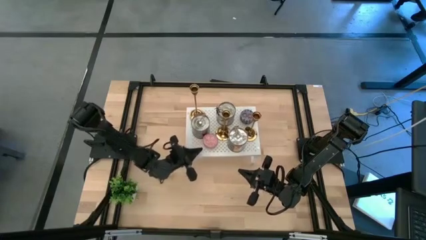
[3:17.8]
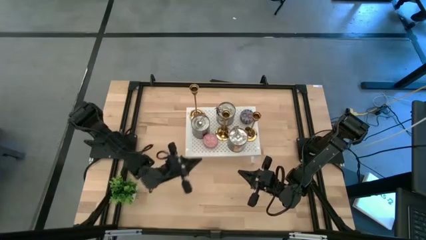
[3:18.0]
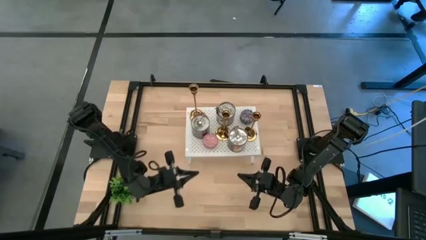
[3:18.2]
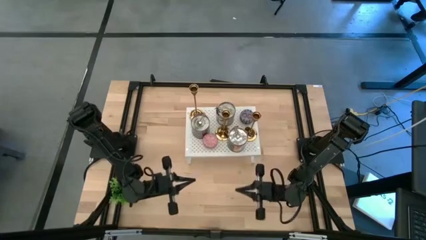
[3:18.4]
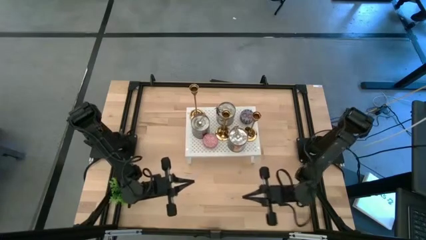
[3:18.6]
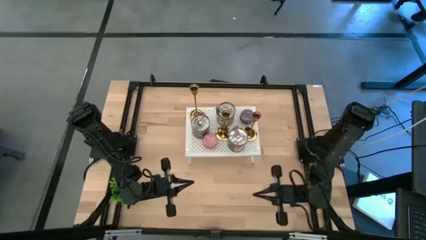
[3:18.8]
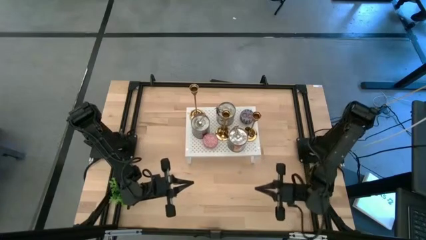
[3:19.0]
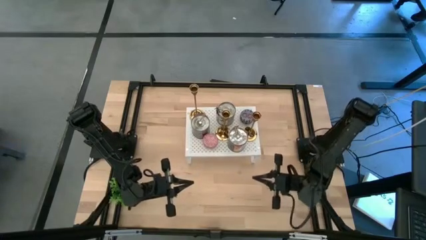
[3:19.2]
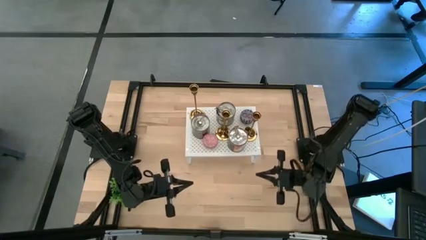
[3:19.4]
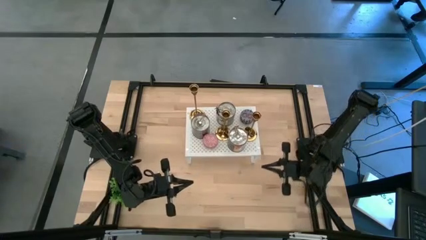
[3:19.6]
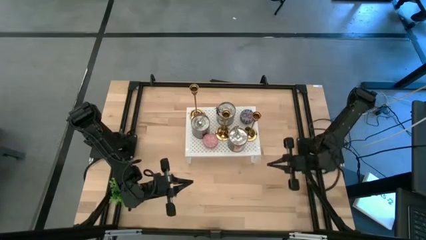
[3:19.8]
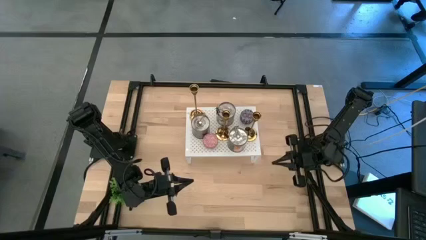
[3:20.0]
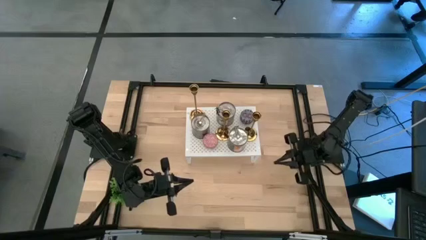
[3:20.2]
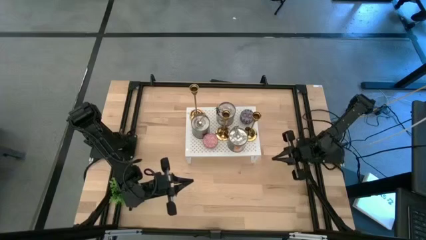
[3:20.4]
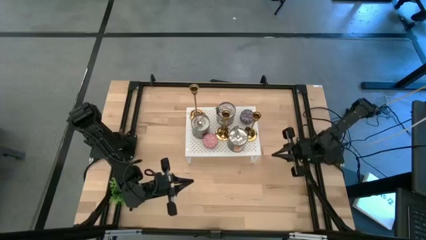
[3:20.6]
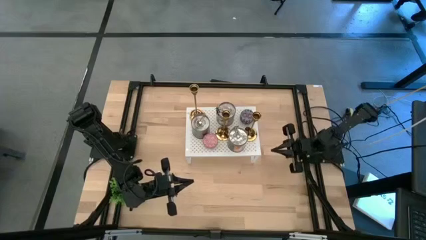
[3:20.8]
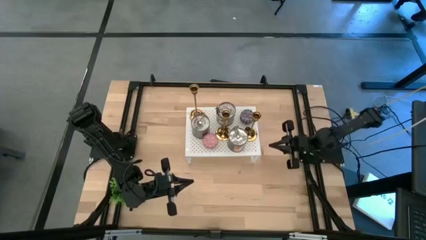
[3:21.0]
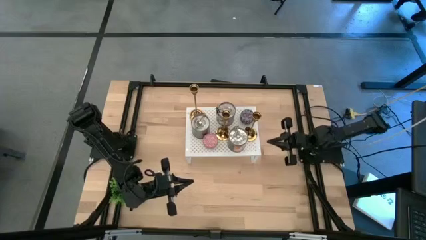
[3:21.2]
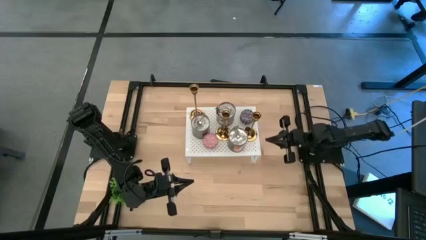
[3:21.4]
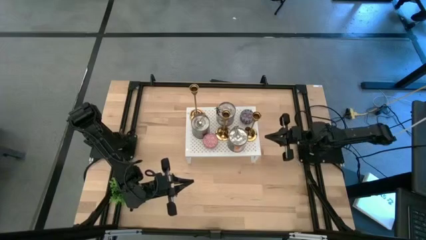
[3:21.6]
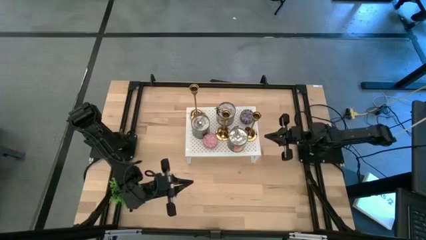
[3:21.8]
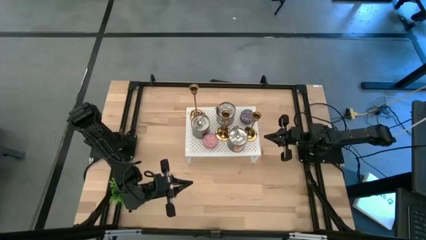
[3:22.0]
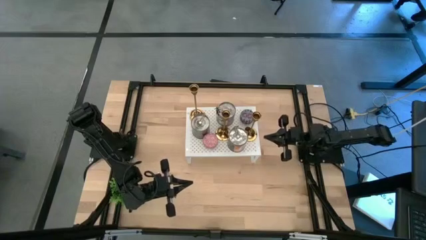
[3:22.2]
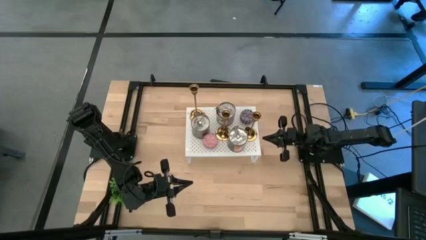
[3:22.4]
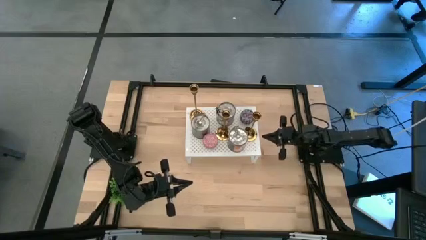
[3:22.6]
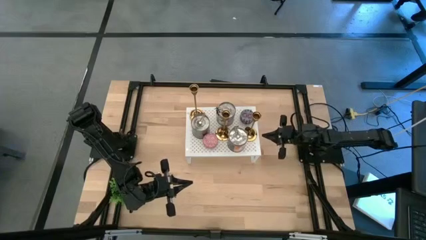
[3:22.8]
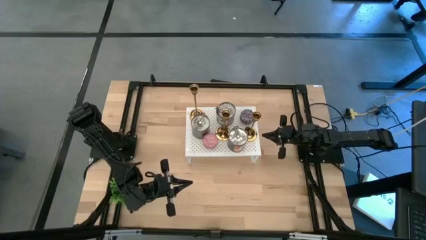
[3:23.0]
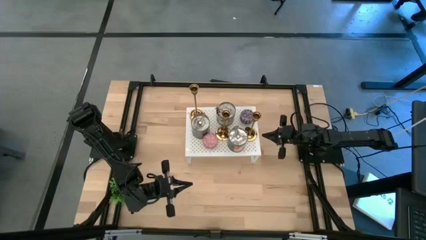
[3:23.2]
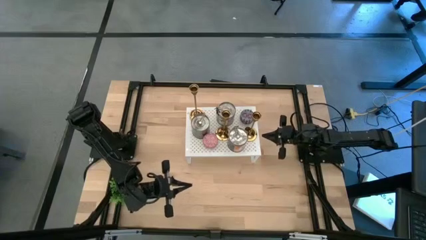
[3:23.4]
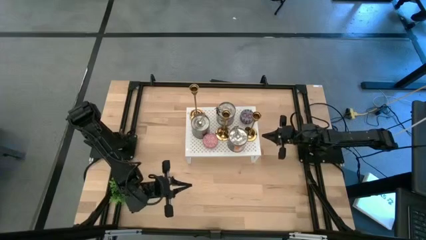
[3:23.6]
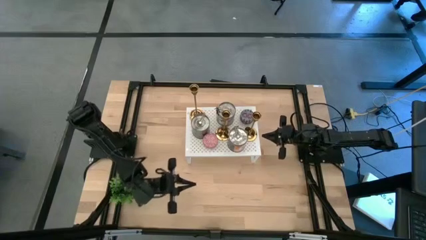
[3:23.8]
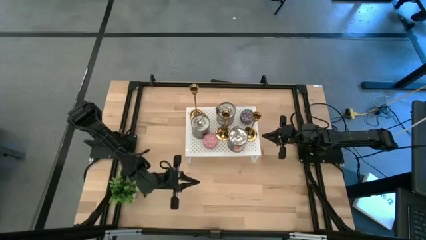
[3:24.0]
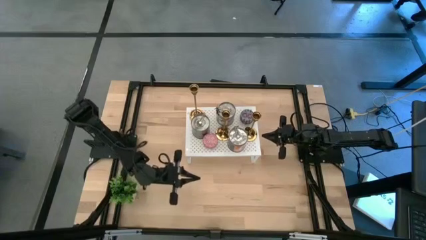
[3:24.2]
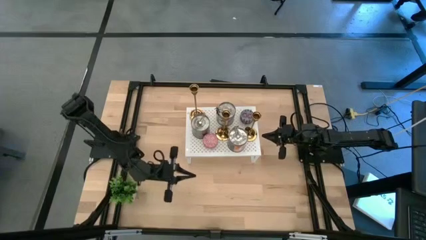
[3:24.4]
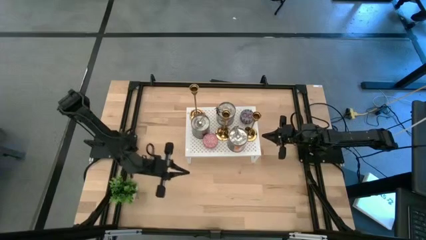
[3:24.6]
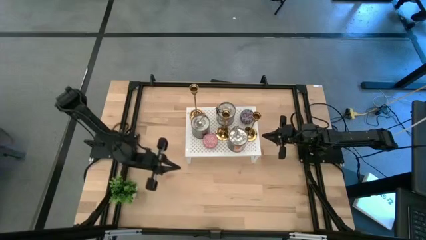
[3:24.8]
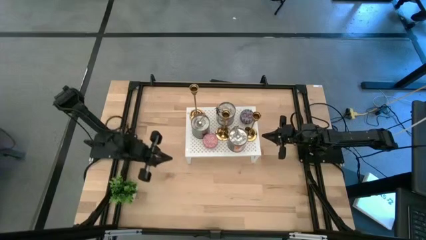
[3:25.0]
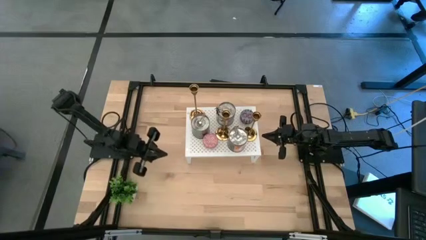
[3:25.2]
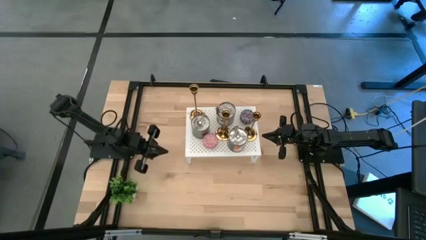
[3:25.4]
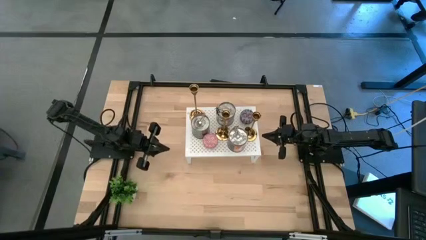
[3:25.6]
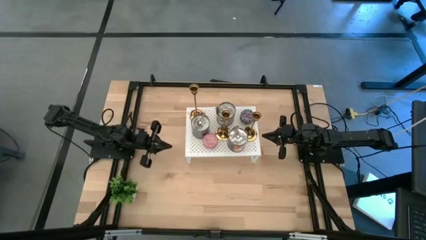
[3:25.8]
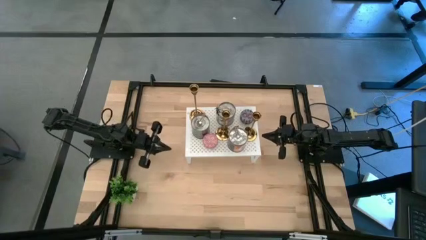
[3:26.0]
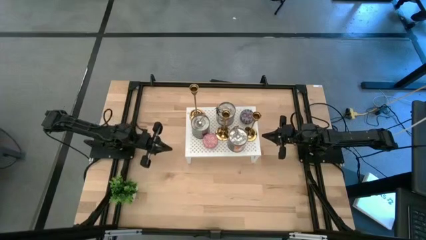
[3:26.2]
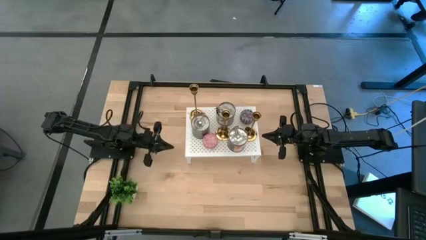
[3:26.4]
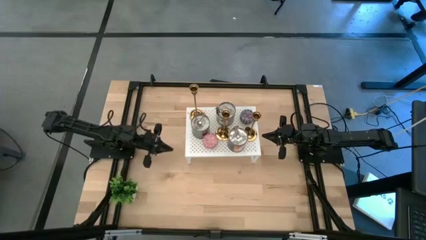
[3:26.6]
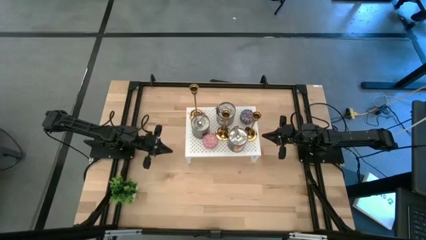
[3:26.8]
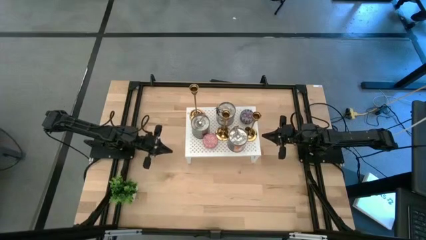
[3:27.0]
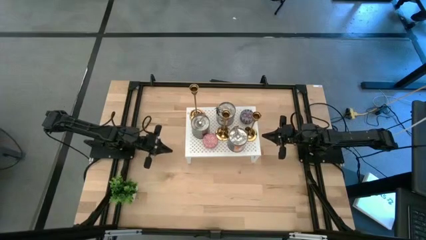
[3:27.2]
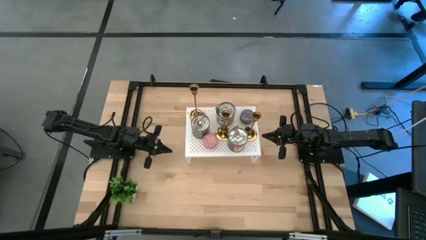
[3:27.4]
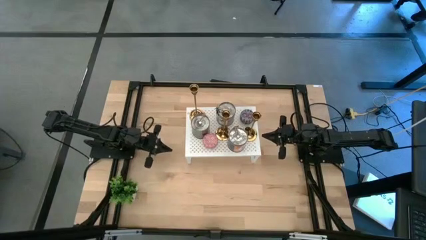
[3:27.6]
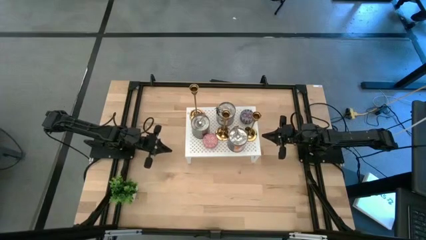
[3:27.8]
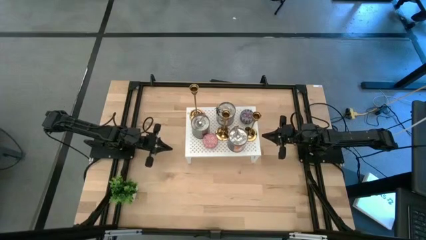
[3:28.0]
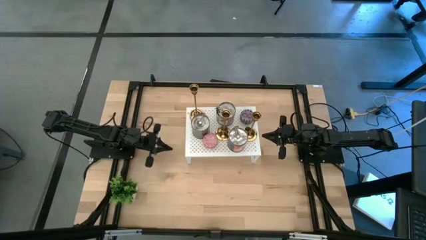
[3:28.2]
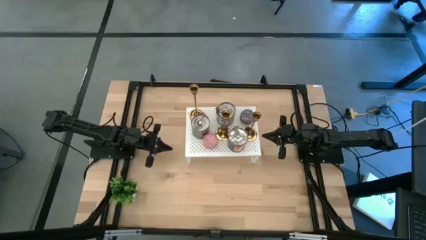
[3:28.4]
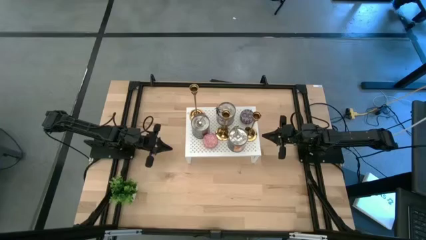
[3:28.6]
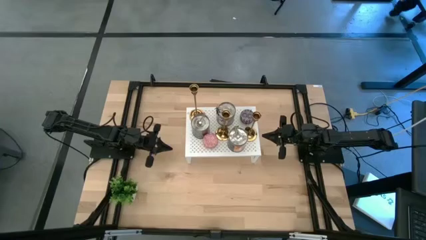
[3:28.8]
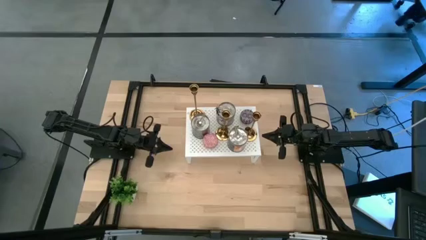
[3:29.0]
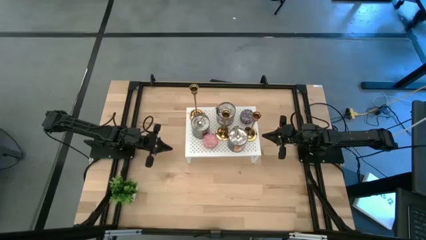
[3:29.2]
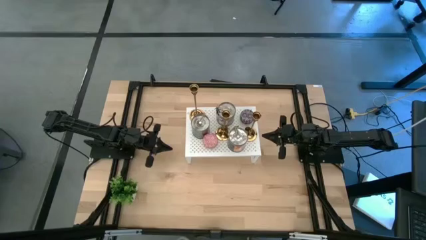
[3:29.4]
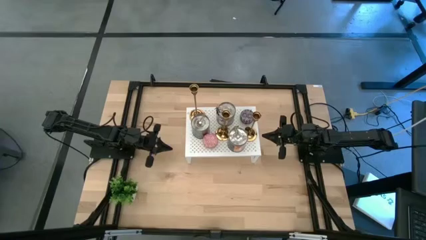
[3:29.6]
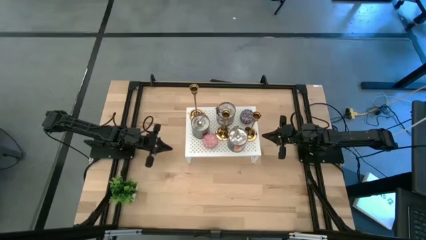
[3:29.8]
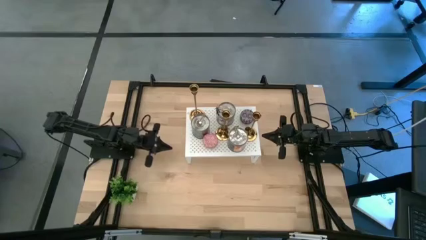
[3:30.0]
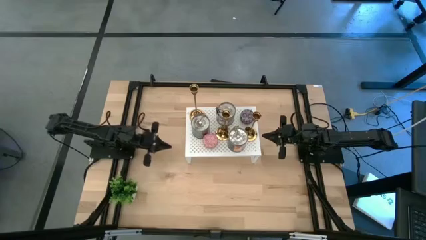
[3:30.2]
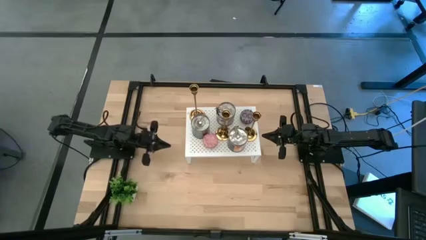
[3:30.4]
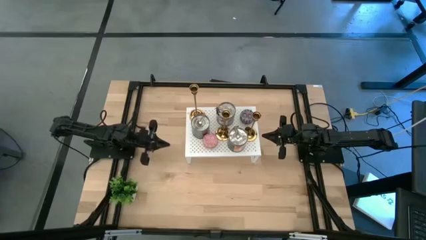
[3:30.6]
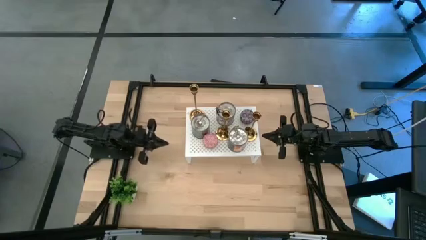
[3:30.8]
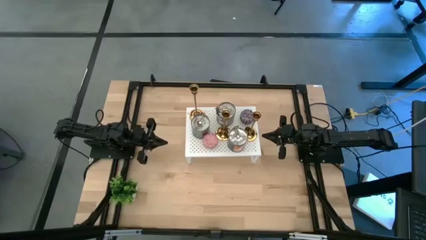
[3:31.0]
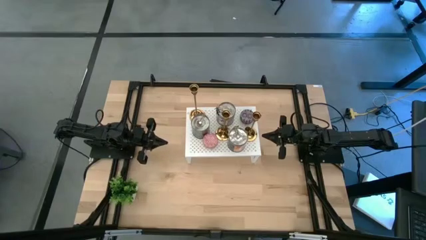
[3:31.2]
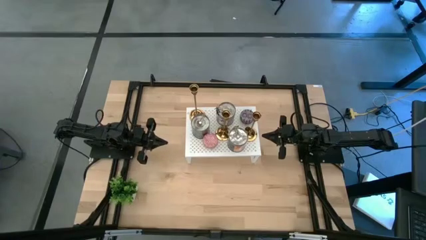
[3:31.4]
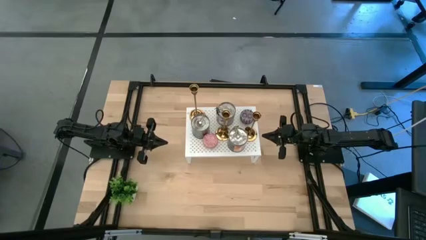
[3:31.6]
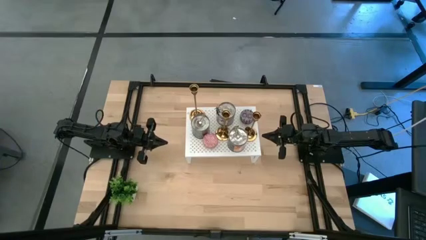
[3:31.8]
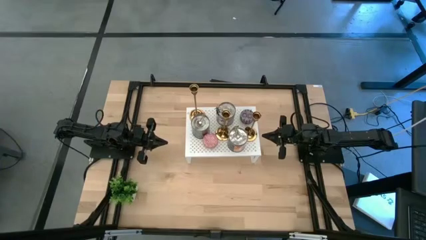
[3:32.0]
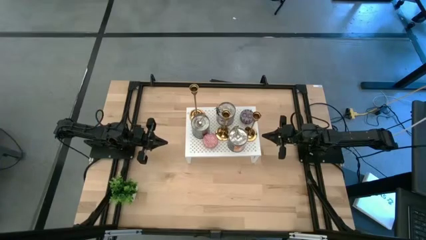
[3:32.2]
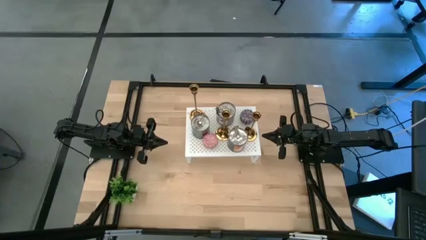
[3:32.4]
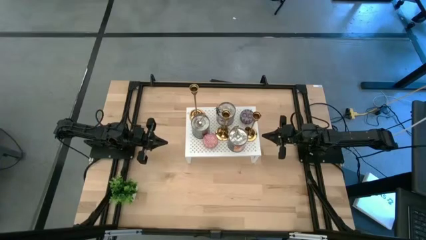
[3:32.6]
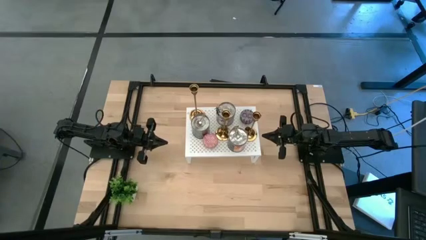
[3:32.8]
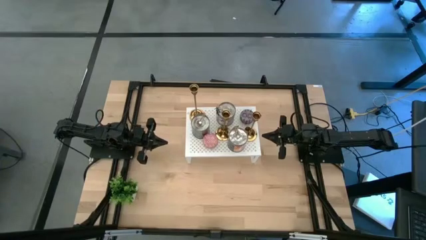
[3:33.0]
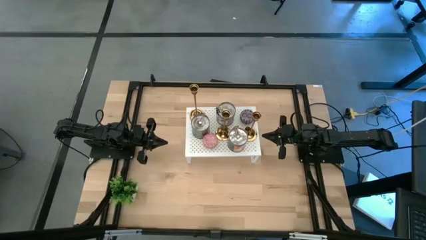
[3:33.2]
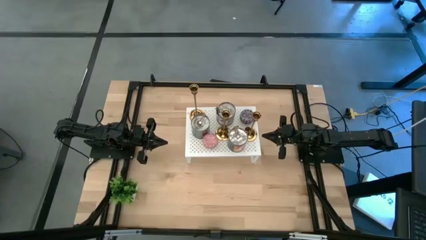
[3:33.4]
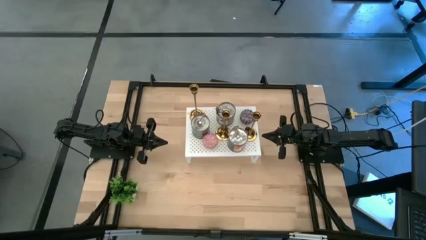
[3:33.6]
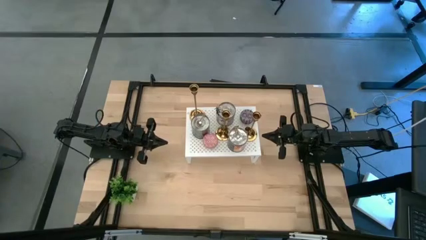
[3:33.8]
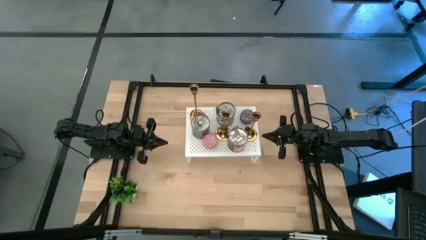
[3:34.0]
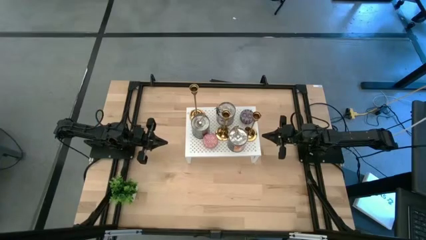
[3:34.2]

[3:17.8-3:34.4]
Task: Pick & Place candle stick holders
Return to Home Position
